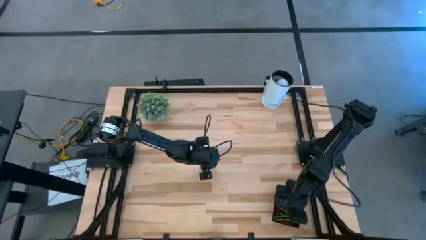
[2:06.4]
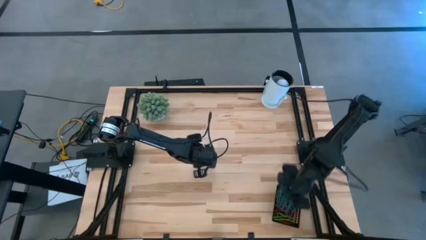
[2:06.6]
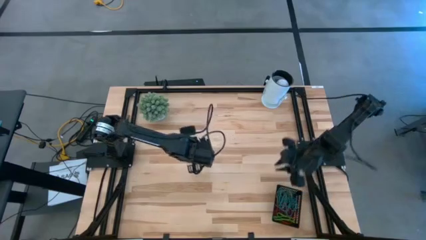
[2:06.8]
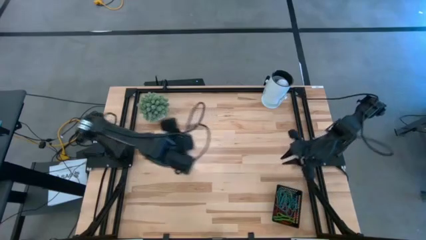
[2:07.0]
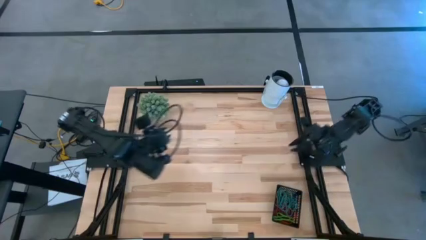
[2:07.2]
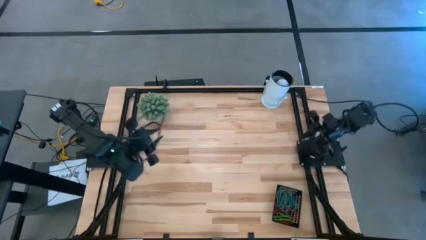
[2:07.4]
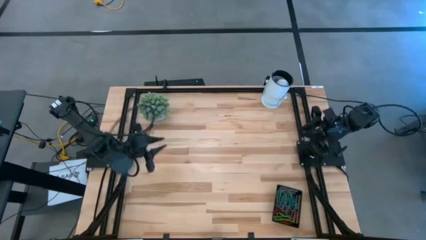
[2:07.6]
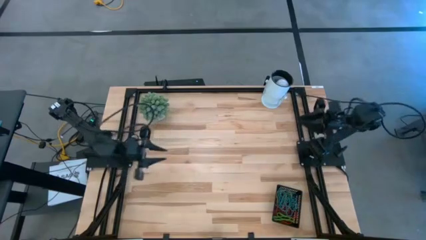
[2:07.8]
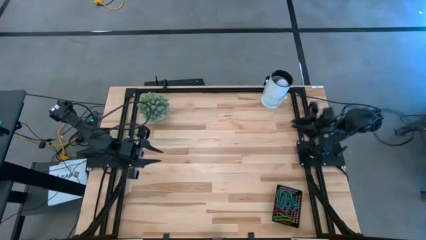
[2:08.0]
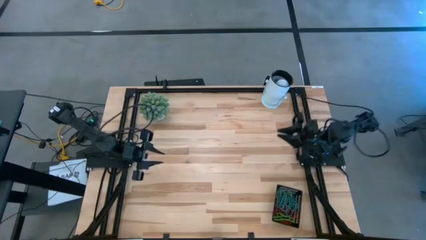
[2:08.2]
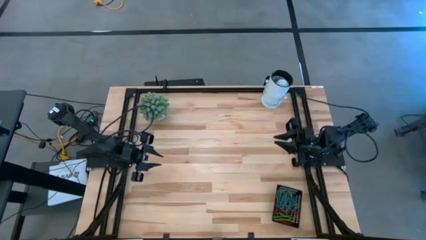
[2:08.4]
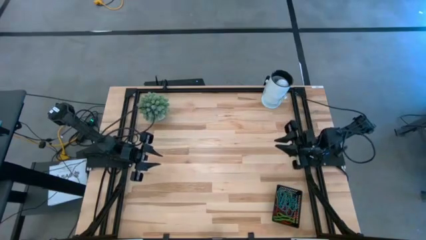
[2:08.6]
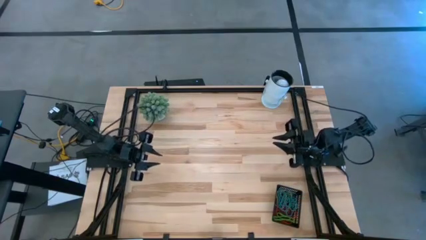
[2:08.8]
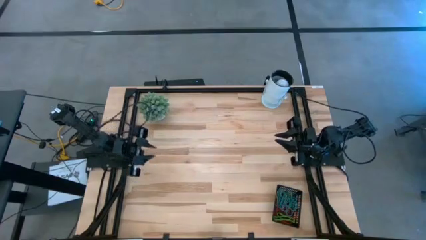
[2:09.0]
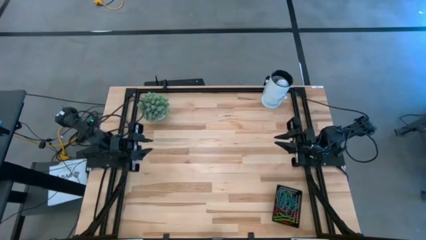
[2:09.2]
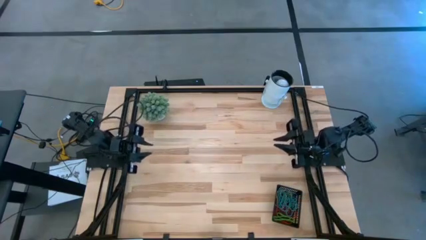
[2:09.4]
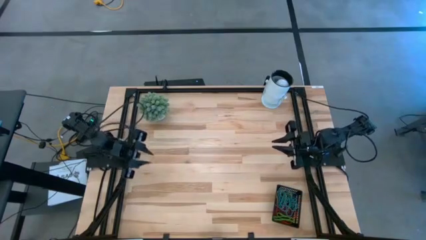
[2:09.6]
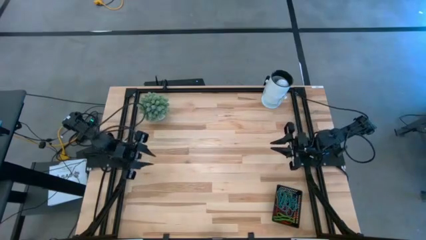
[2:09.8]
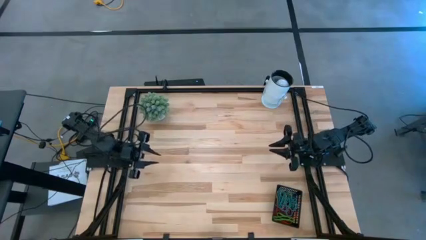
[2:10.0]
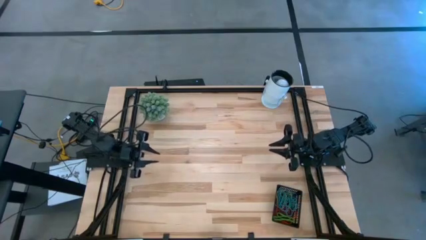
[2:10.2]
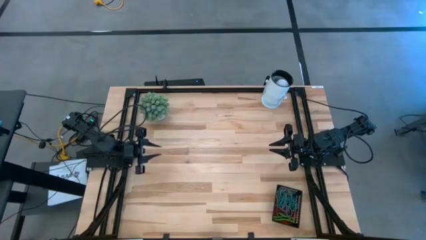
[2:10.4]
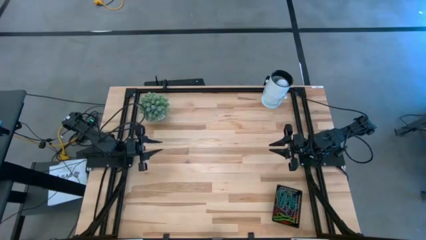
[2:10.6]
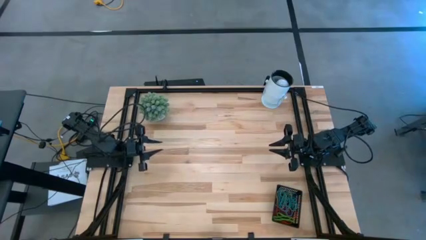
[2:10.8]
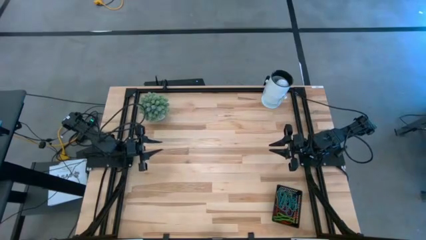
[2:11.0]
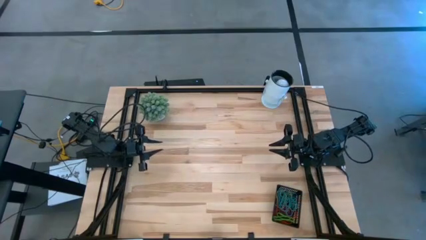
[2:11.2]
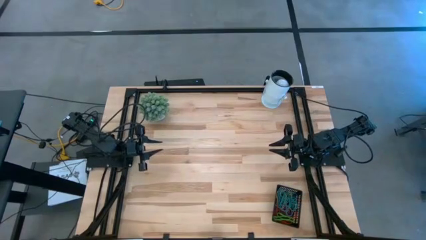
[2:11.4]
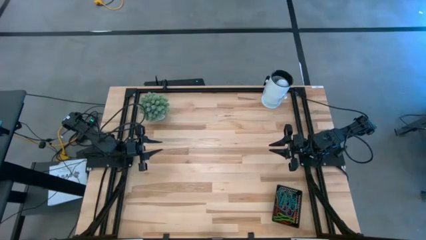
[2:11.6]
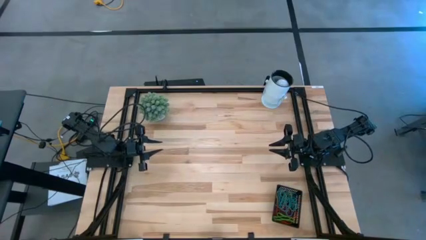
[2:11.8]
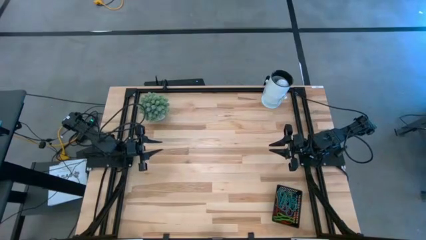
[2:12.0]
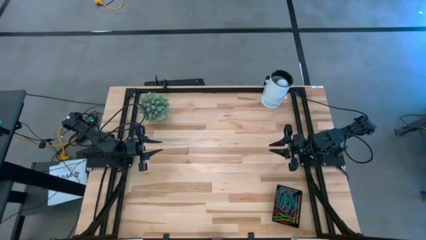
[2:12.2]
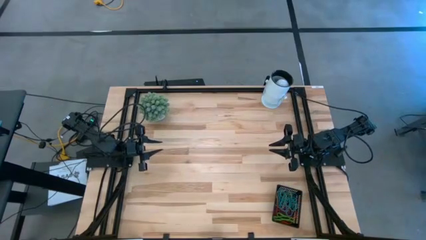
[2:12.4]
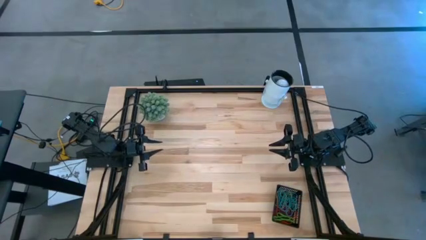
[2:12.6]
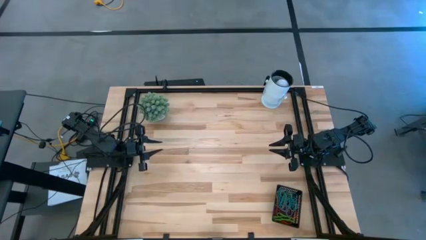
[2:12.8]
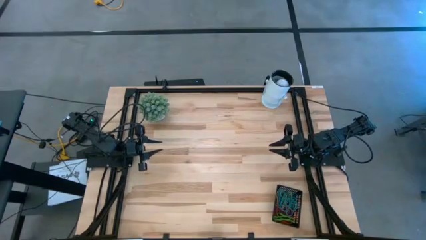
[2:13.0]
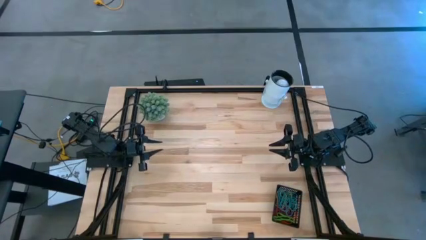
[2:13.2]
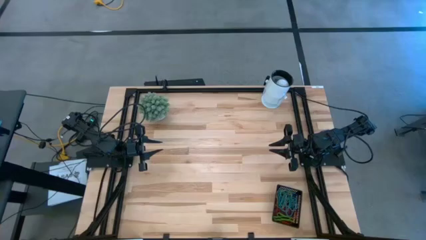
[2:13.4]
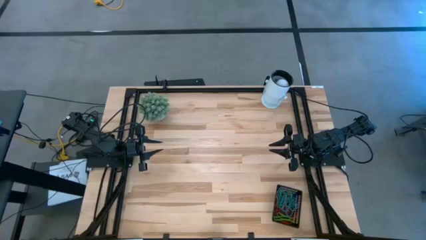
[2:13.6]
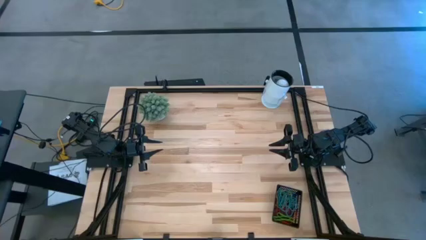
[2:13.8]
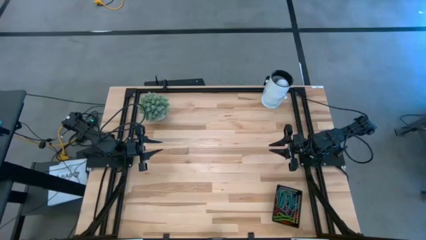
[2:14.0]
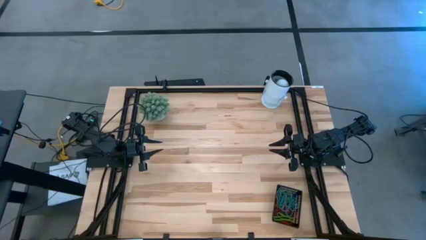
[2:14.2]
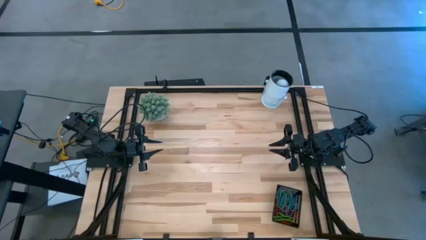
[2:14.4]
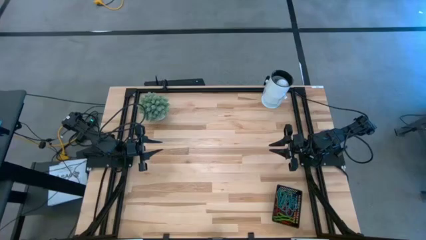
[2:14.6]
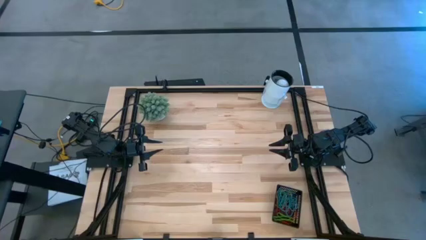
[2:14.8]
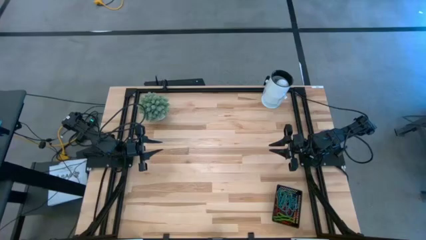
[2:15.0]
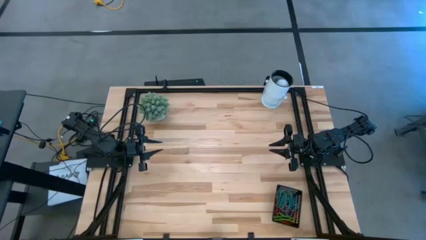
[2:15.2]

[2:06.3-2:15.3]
Task: Pick and place items into bin
Return to Home Position

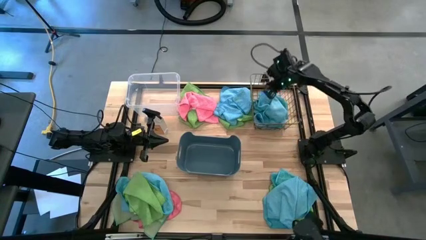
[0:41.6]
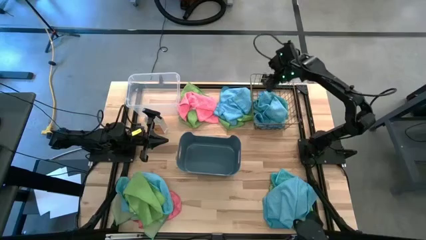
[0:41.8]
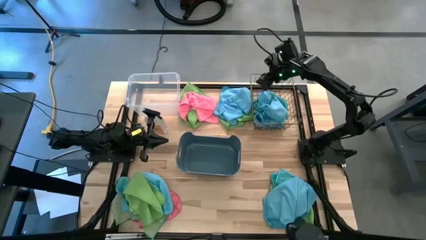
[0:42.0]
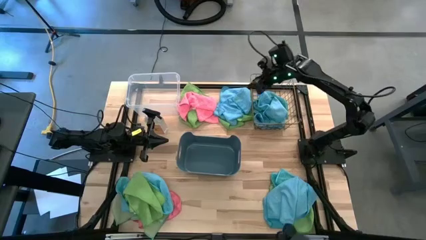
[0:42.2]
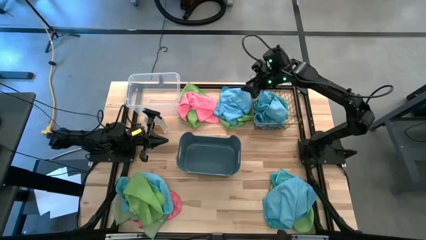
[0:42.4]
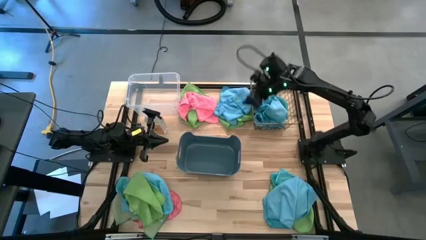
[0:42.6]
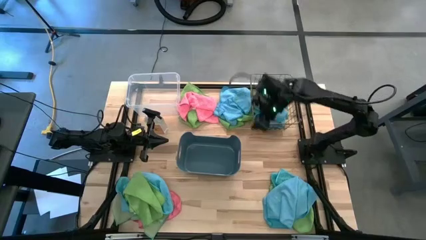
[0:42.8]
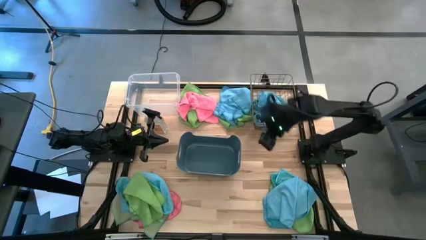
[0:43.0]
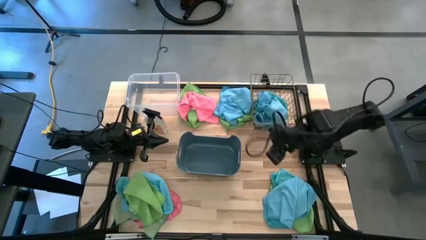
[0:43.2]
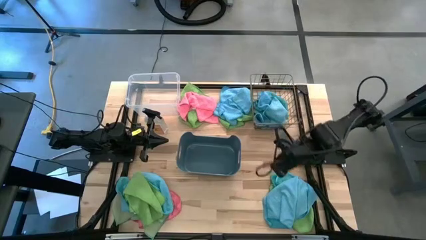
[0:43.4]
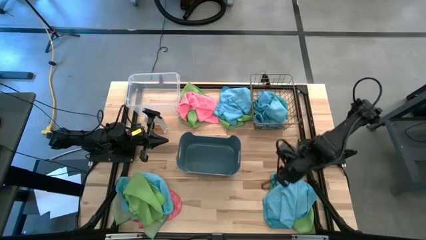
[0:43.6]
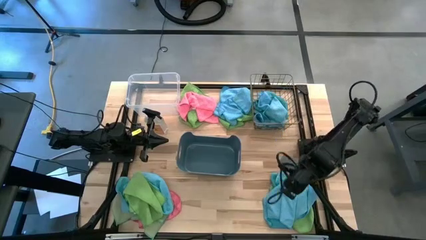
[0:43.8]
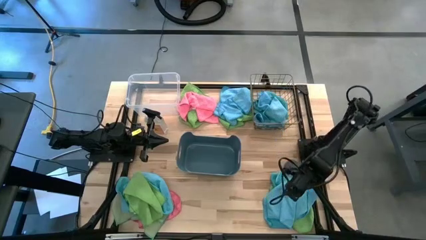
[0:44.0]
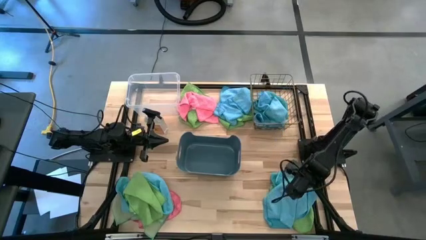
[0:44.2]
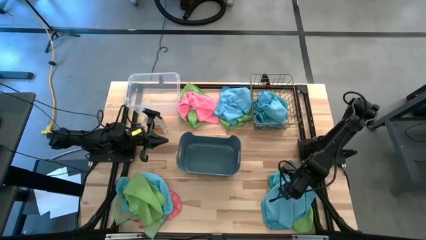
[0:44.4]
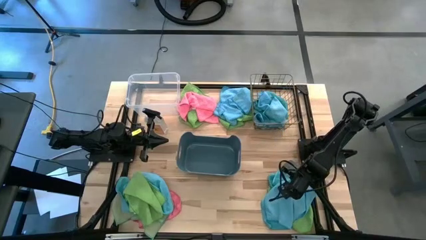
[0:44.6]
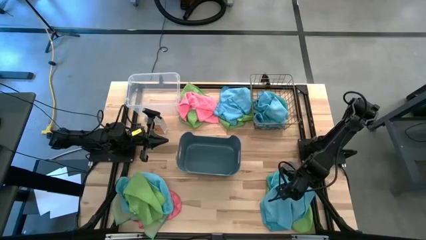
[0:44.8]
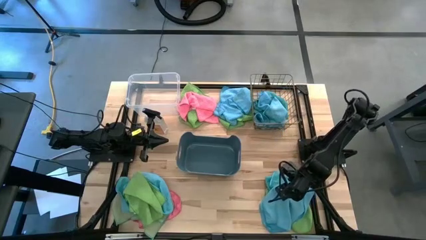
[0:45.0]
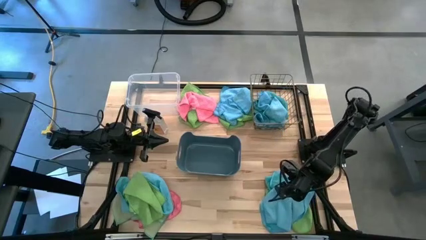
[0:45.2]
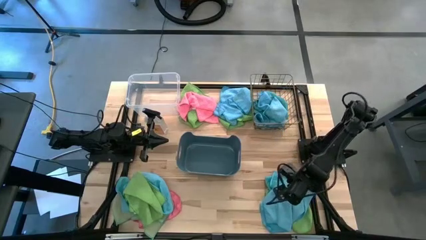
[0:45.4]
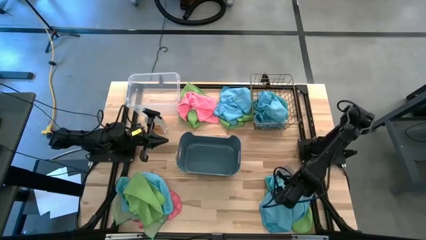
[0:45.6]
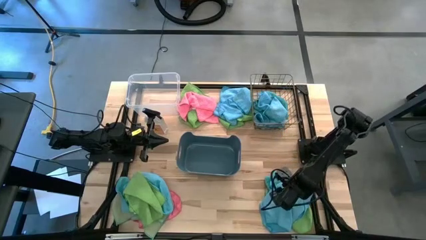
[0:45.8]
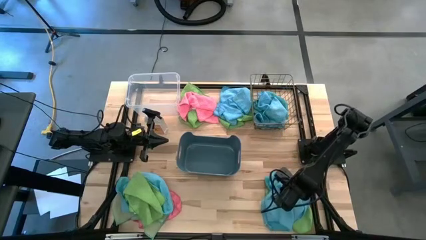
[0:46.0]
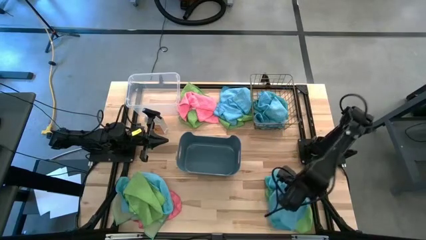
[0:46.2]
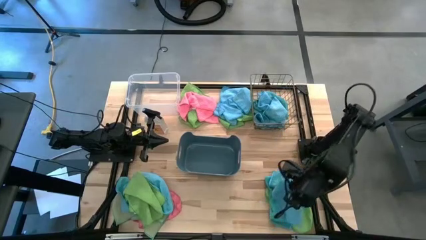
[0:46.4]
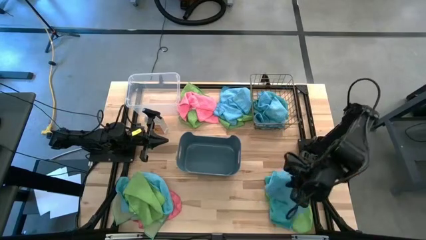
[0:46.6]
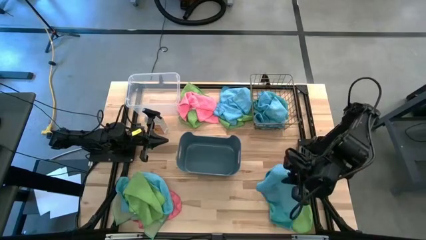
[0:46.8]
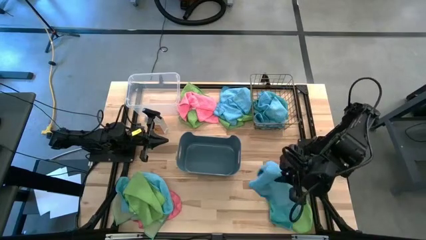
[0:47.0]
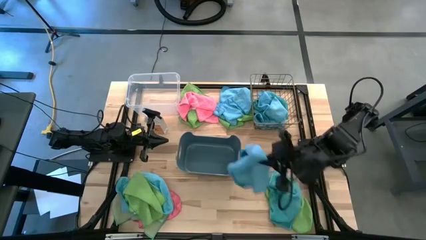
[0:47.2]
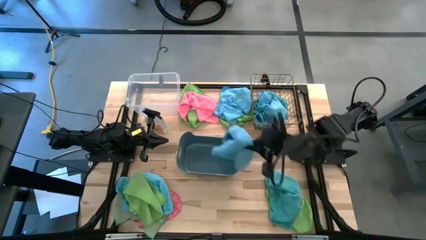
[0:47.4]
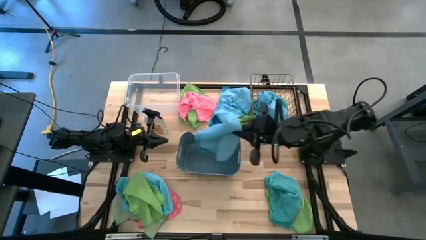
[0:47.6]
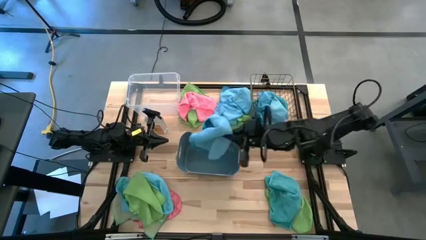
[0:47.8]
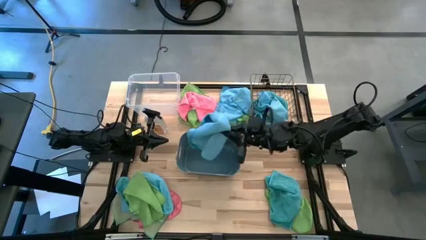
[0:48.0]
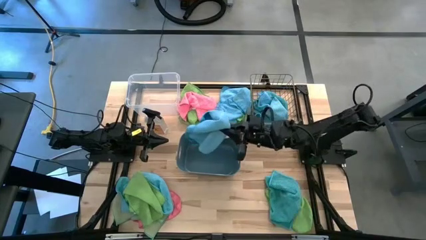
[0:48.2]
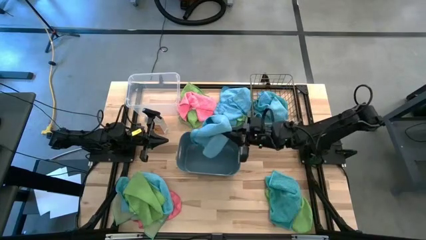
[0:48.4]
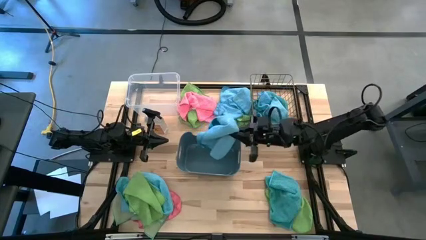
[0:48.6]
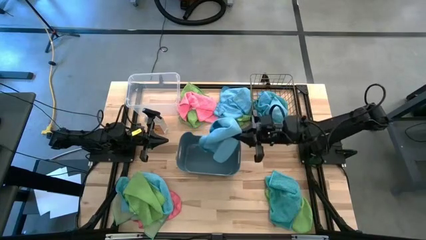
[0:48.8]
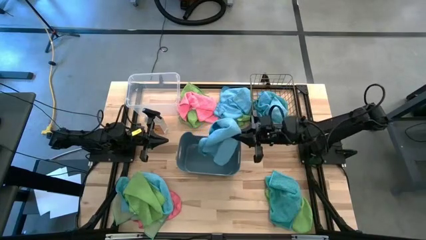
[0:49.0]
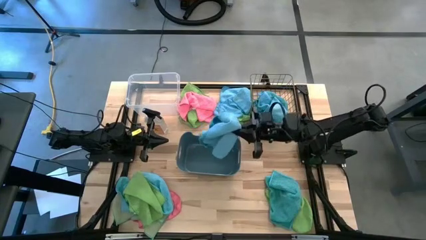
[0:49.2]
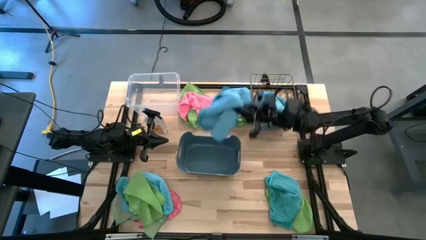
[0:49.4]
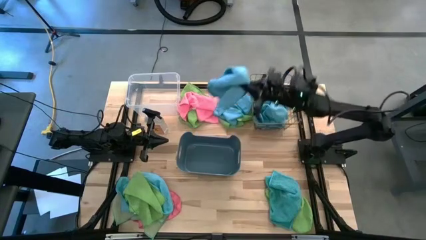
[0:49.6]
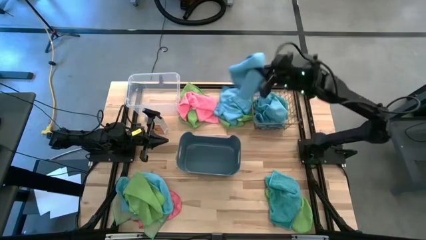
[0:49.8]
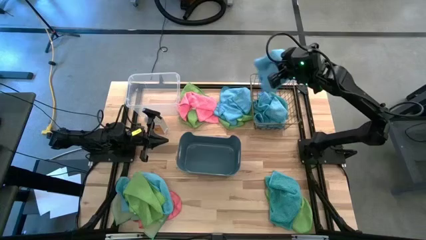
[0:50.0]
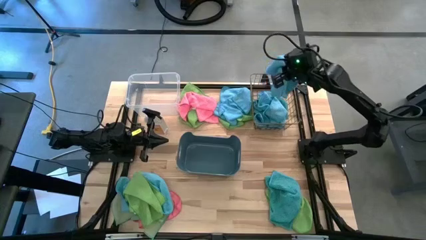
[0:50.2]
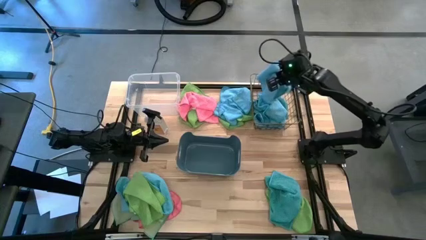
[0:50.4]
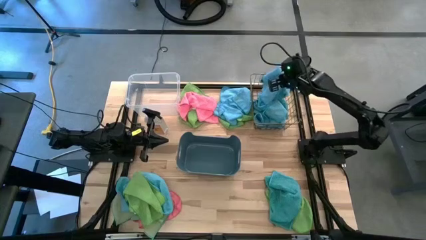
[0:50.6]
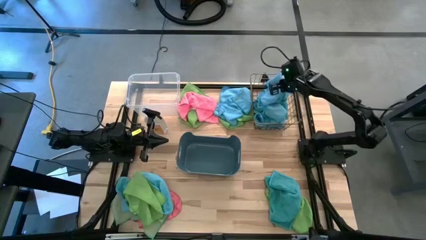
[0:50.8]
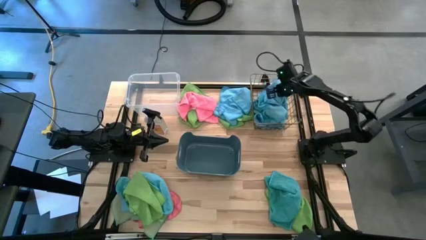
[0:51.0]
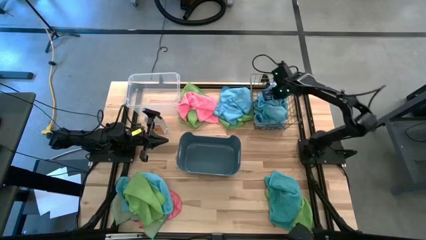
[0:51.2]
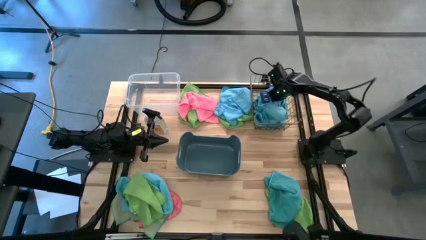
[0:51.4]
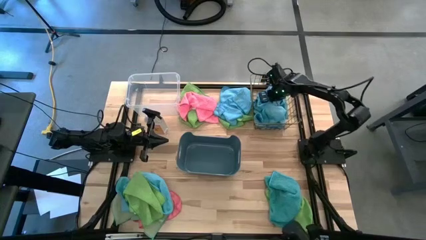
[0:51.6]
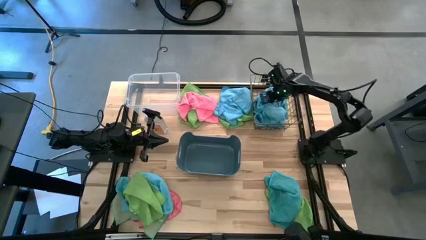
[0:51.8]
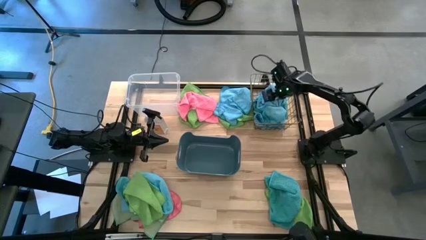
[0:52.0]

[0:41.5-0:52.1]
Task: Sort microfiber towel by color & place in baskets
Put the blue microfiber cloth into the gold wire basket
